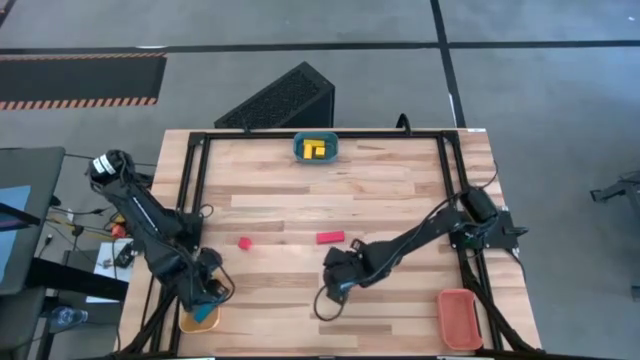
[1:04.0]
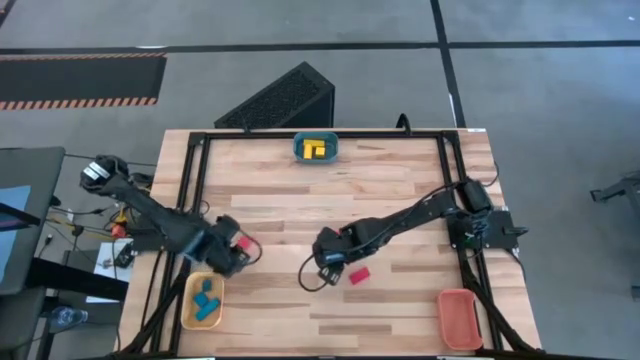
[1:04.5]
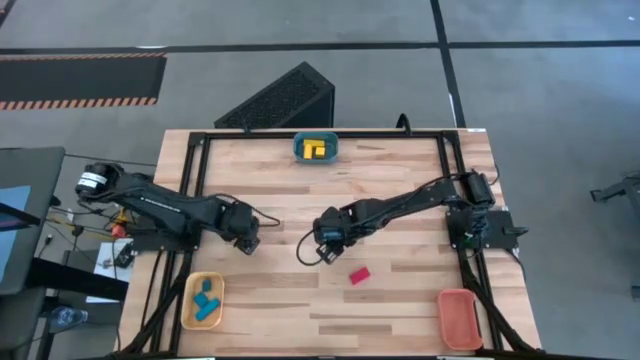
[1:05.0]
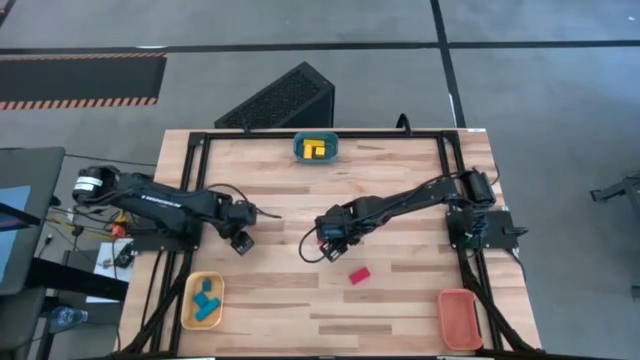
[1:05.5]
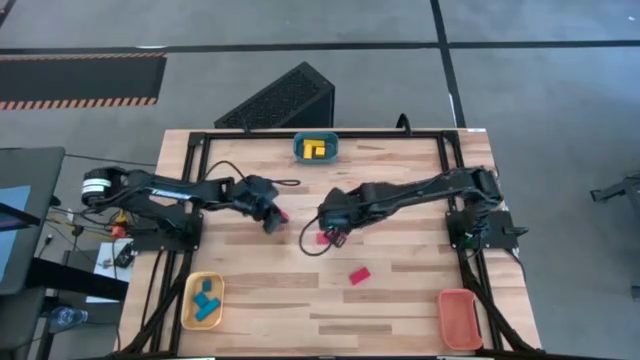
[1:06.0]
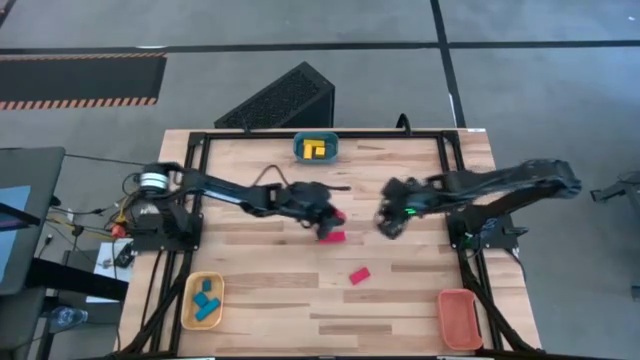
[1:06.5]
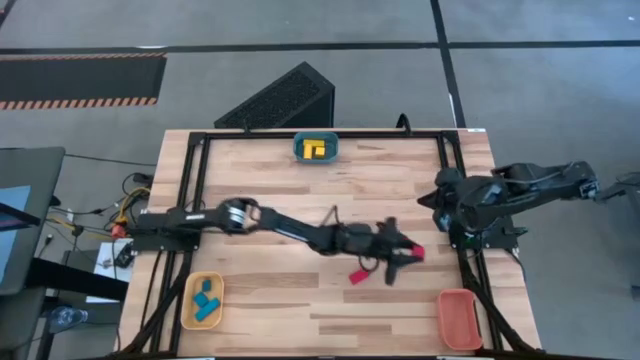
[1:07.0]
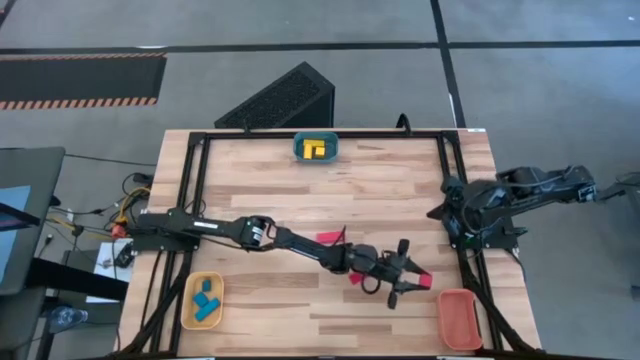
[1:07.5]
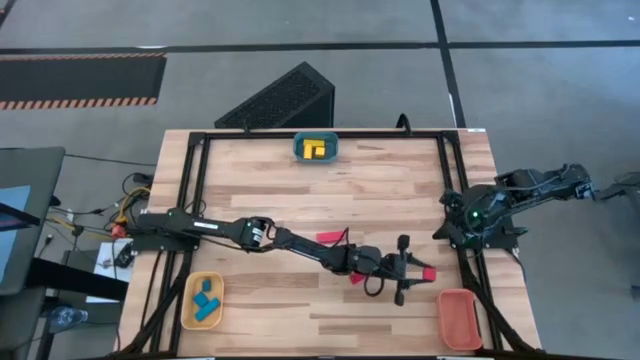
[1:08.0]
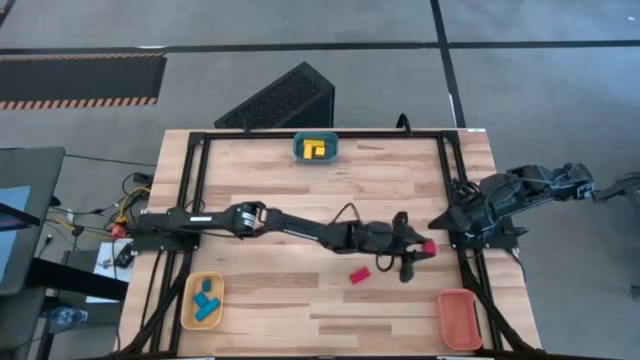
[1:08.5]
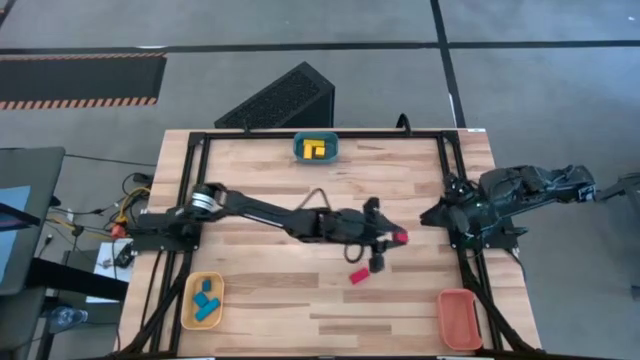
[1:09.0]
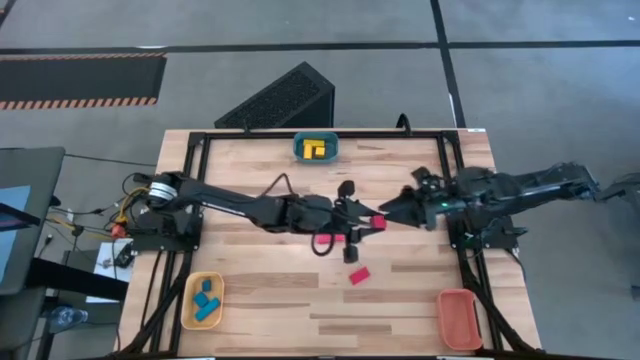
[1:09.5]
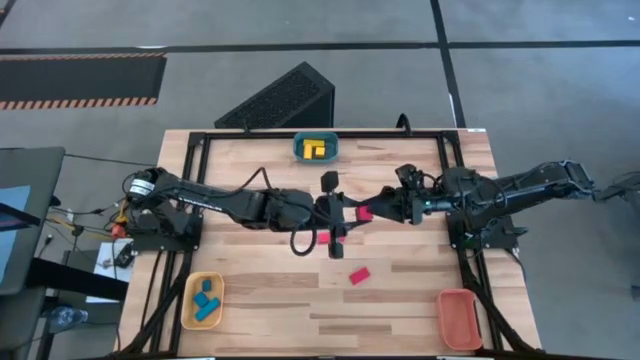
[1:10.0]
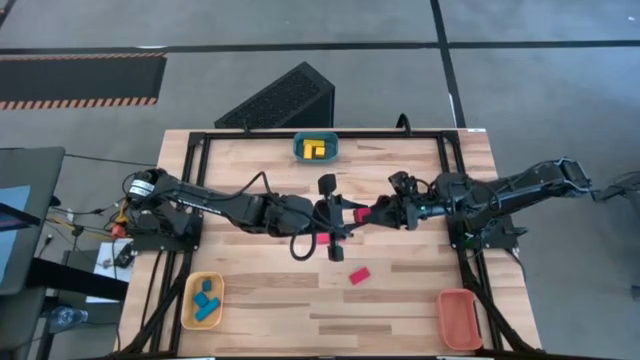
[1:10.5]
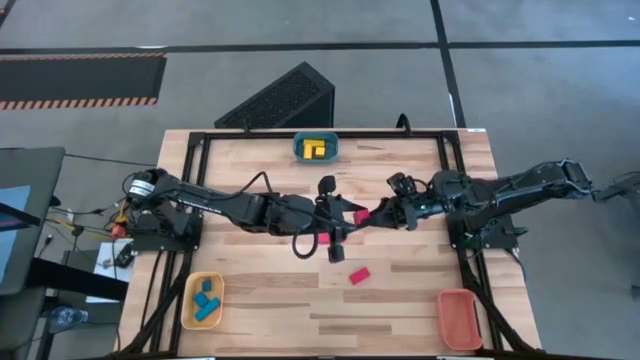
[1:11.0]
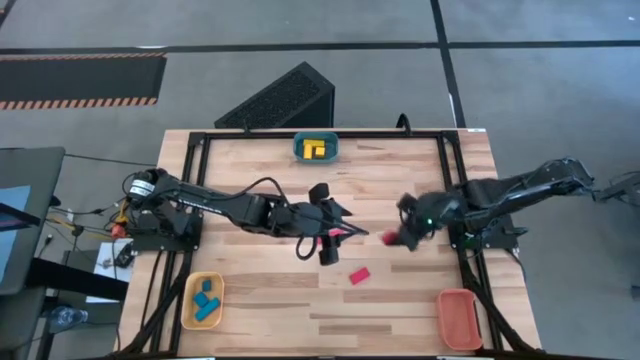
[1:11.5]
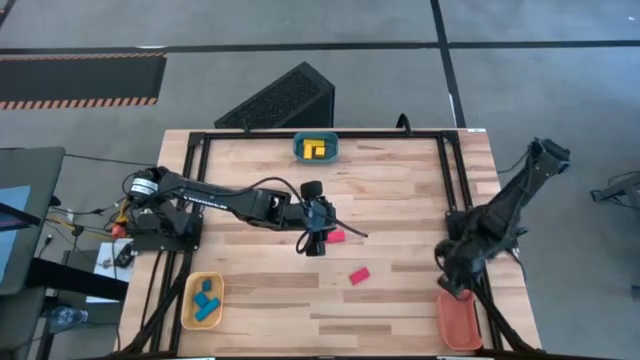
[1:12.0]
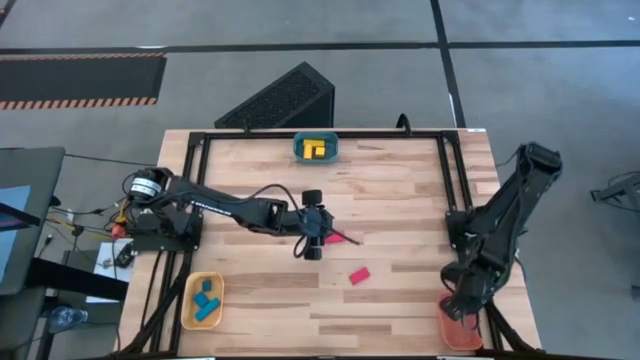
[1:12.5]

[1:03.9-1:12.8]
Task: Sort & place blocks by color
Put the left red block into the orange bin

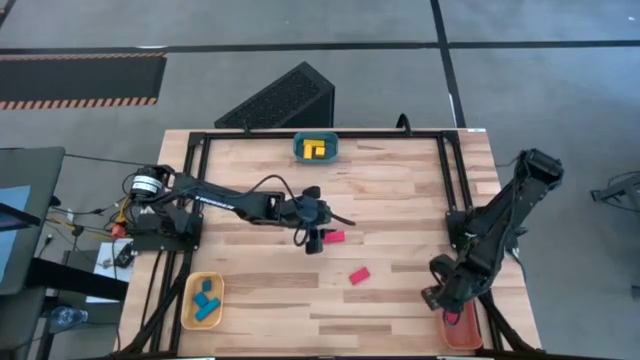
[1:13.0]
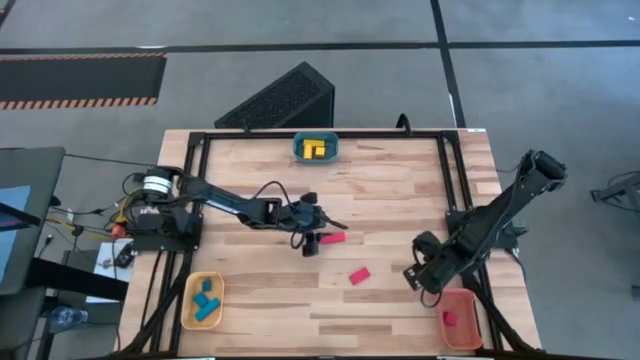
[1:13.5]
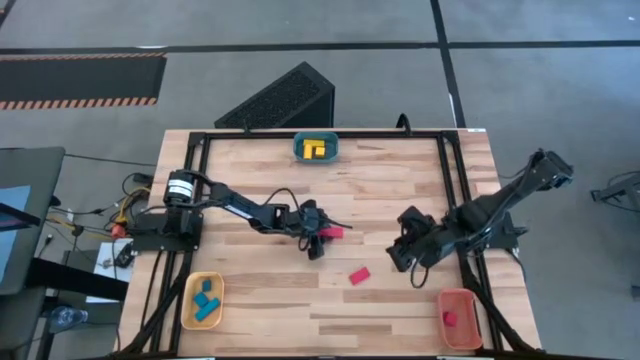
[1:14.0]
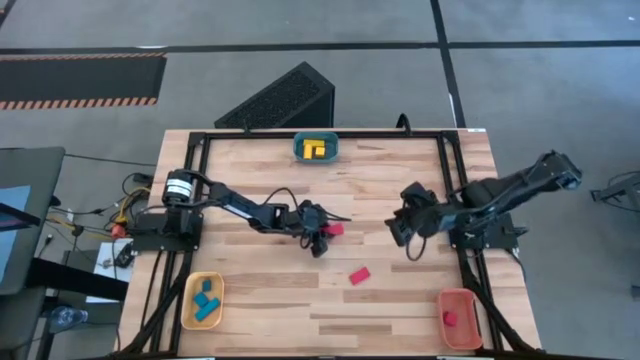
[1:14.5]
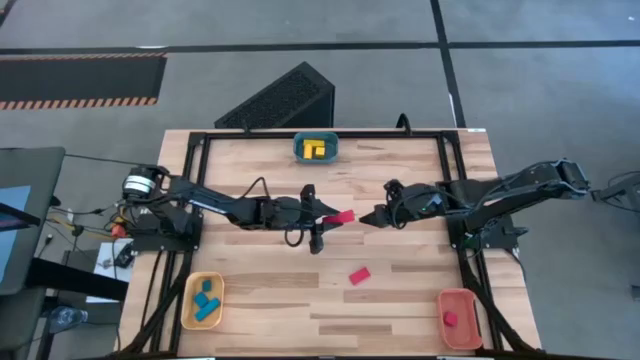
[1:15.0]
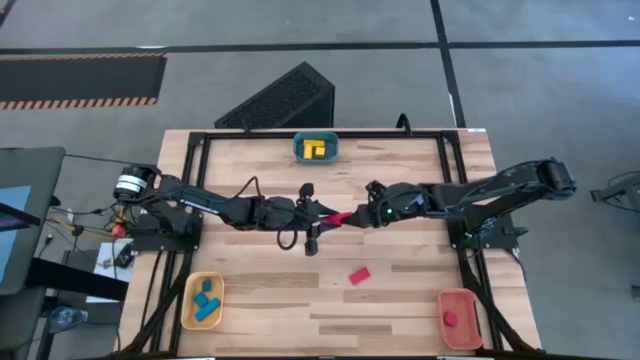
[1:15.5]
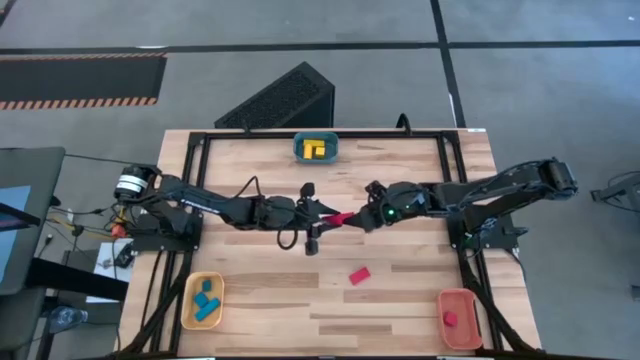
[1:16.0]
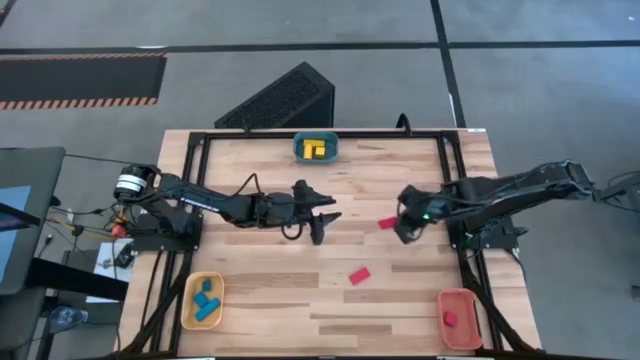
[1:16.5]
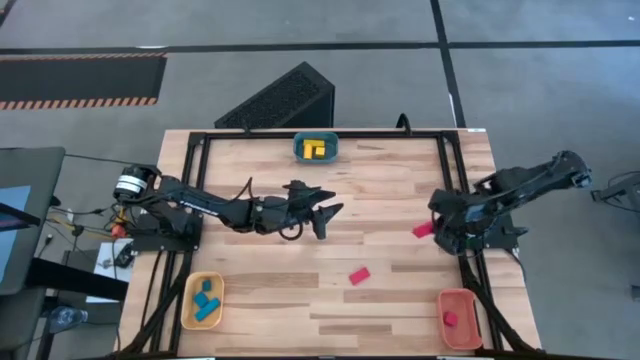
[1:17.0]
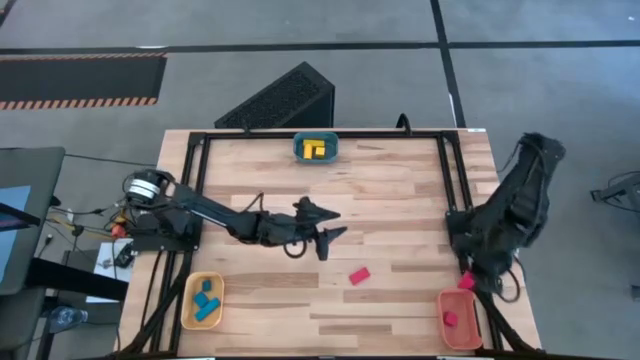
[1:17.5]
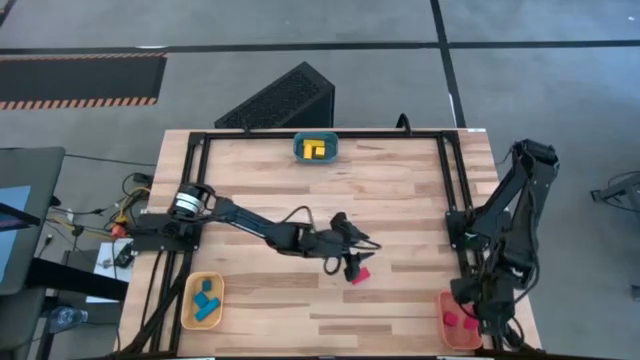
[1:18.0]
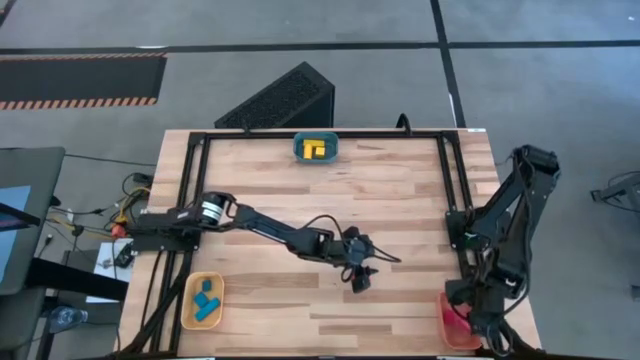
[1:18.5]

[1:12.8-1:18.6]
Put the top red block into the orange bin

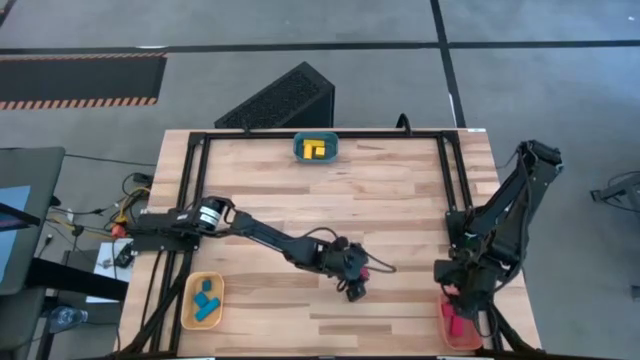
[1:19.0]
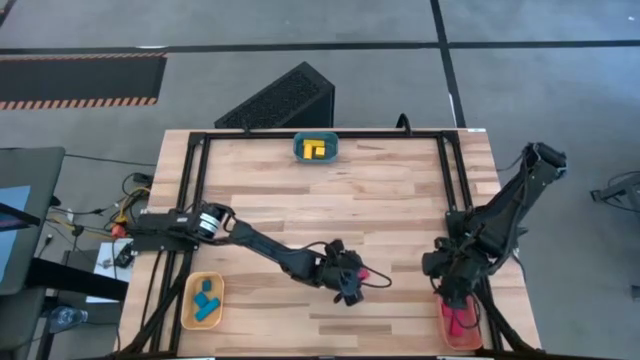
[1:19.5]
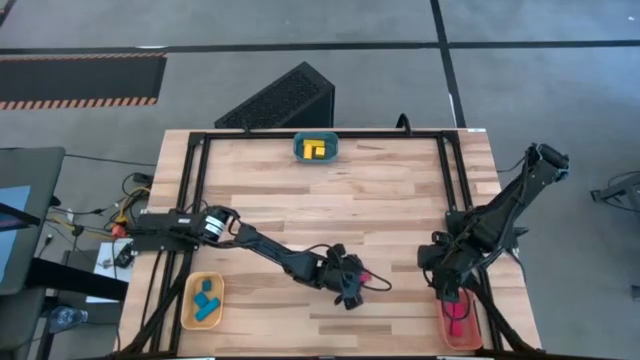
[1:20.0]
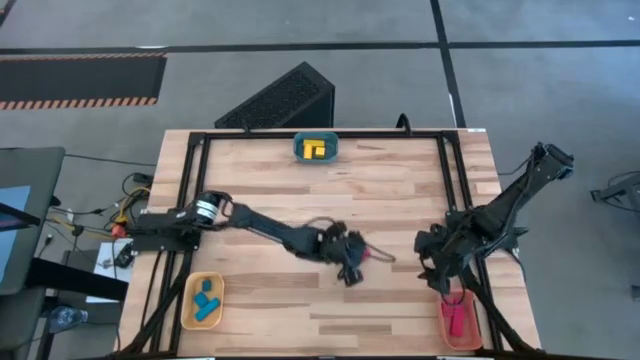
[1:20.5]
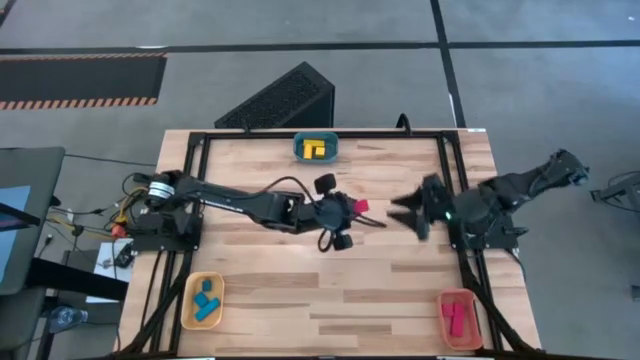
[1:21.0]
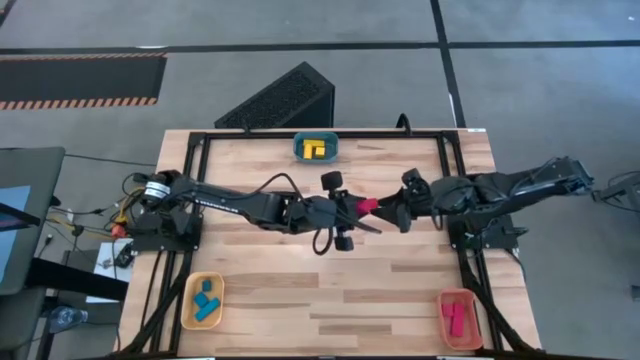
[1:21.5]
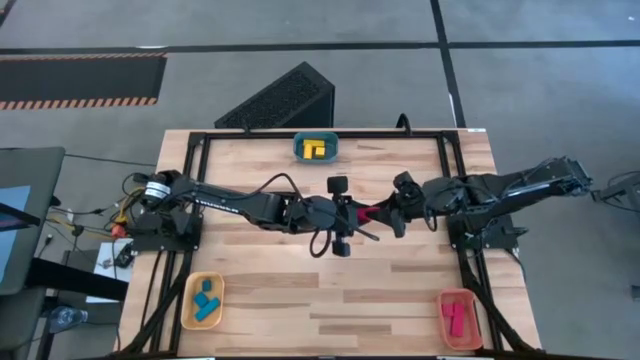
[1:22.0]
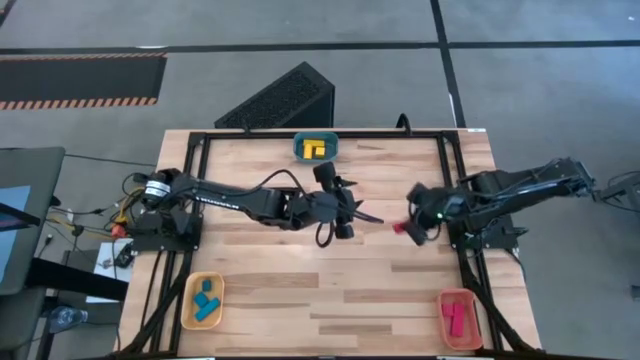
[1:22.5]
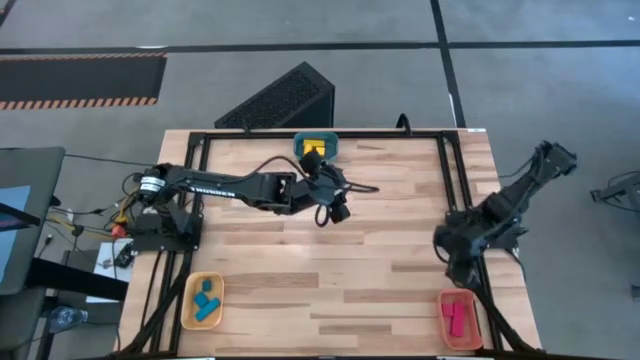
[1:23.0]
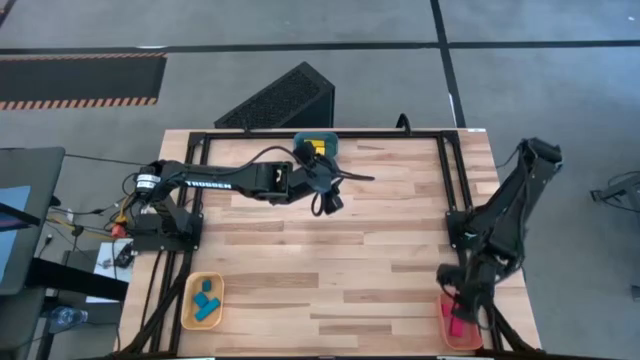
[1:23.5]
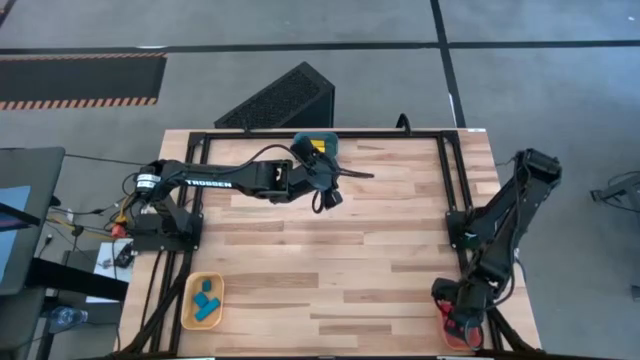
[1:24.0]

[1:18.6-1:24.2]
Put the red block into the orange bin

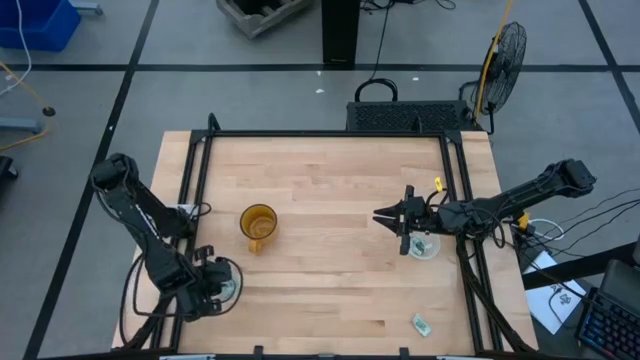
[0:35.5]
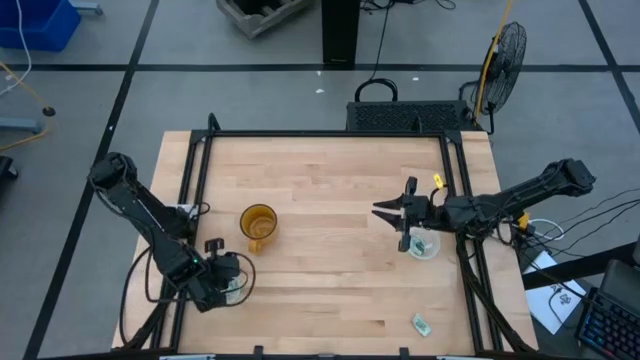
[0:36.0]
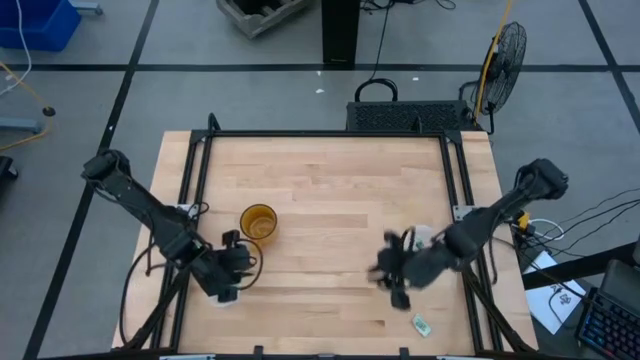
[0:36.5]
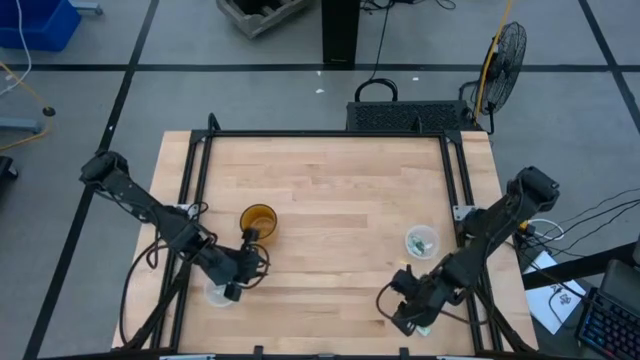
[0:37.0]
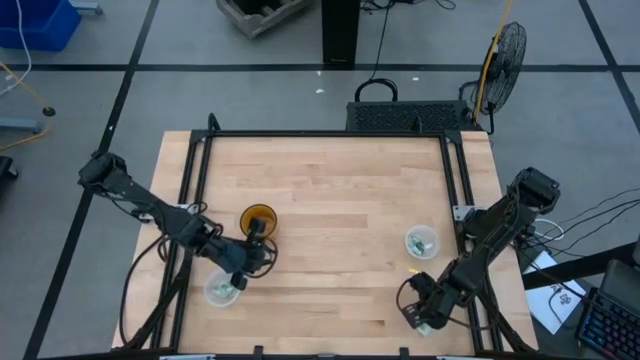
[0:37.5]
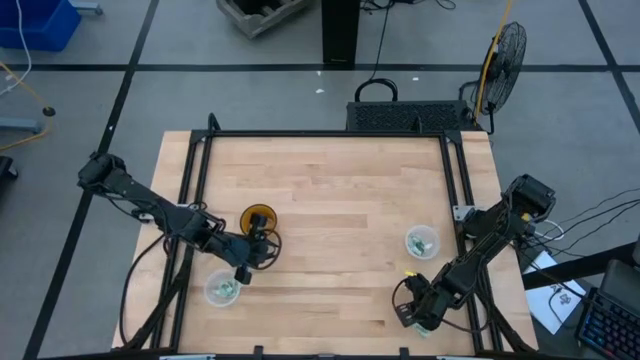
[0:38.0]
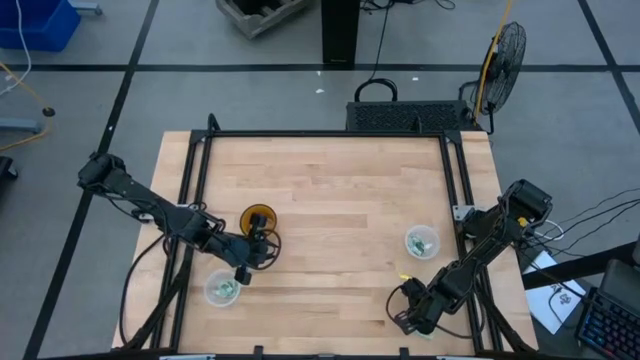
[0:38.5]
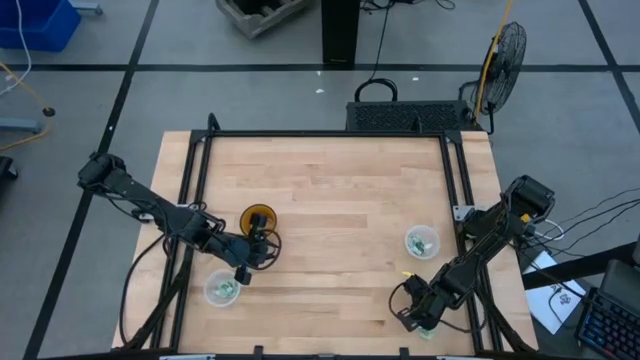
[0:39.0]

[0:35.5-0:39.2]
Task: Pick and place Stevia / Truvia into bins
Put the stevia packet into the right transparent container
